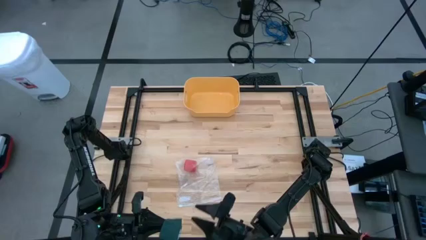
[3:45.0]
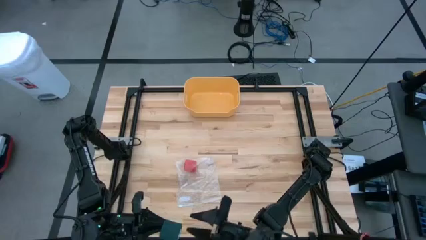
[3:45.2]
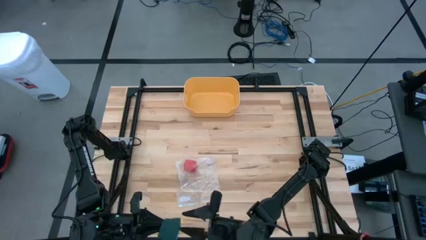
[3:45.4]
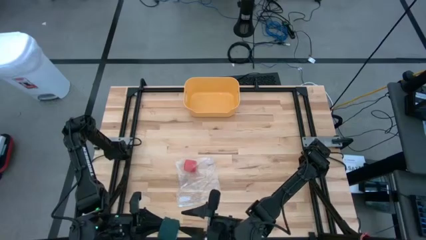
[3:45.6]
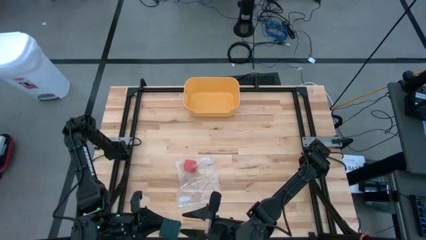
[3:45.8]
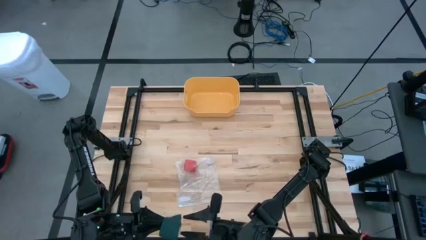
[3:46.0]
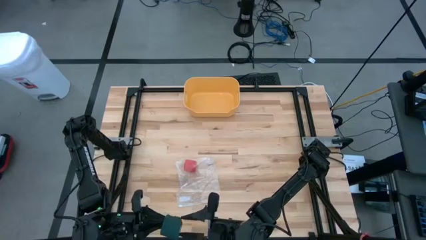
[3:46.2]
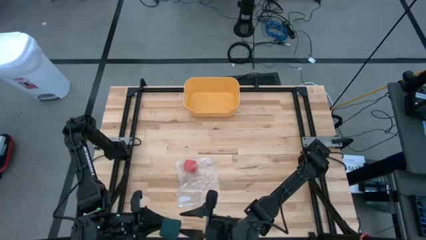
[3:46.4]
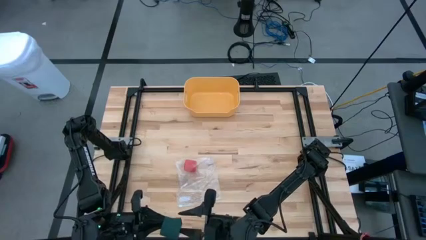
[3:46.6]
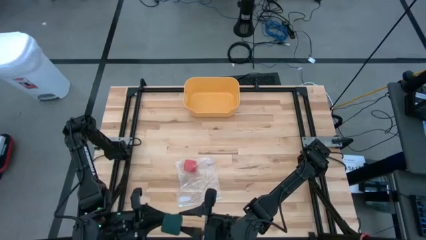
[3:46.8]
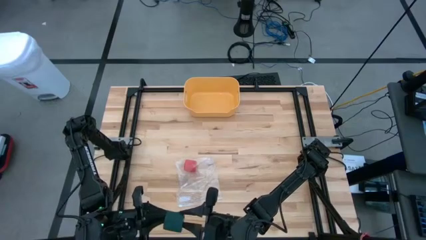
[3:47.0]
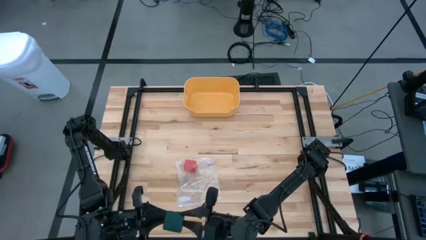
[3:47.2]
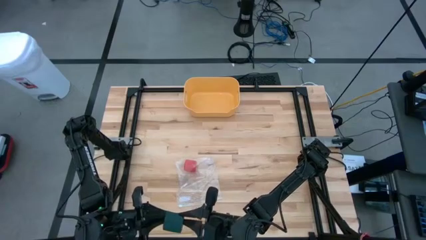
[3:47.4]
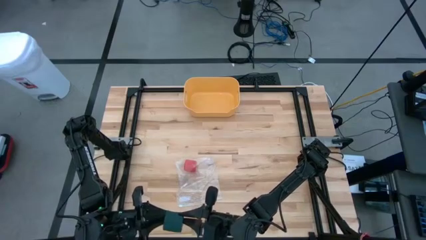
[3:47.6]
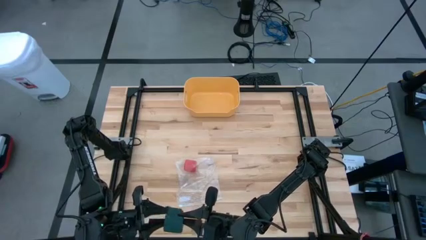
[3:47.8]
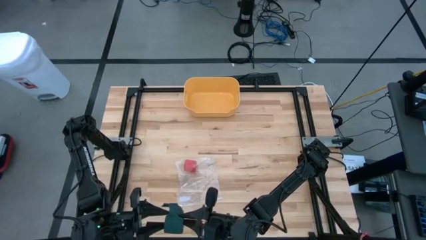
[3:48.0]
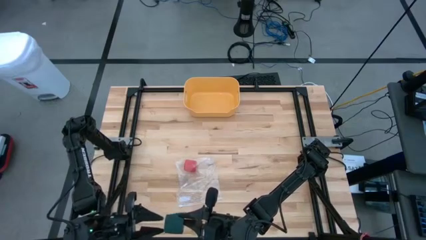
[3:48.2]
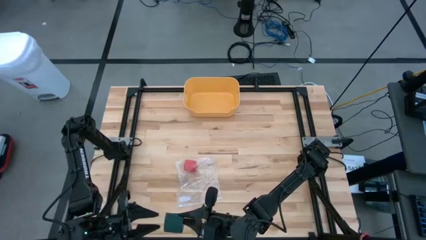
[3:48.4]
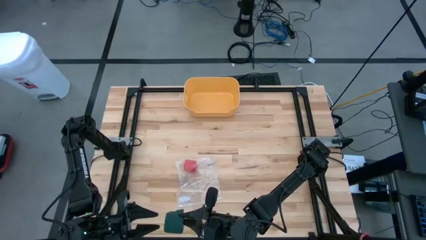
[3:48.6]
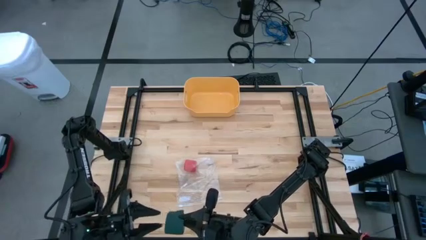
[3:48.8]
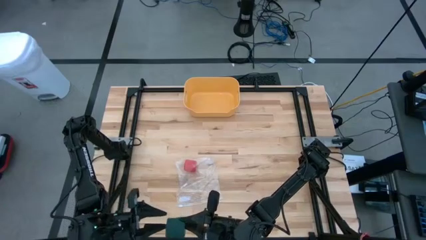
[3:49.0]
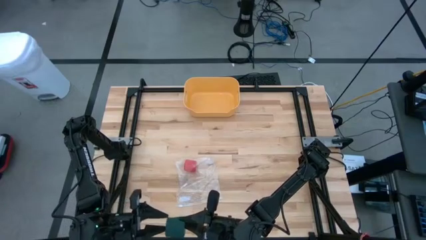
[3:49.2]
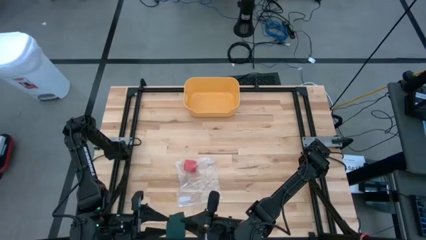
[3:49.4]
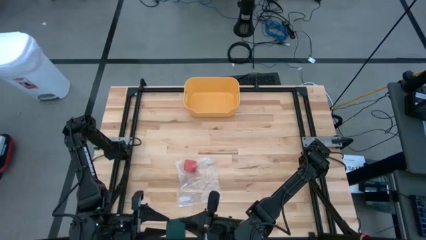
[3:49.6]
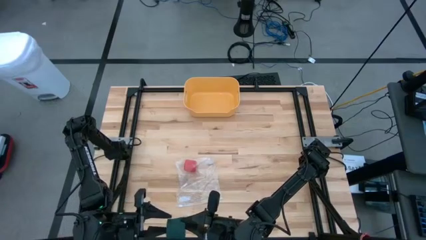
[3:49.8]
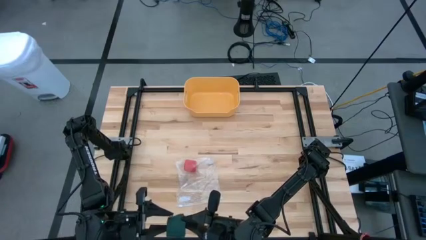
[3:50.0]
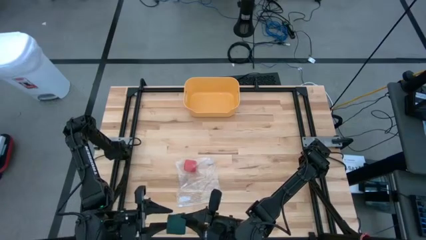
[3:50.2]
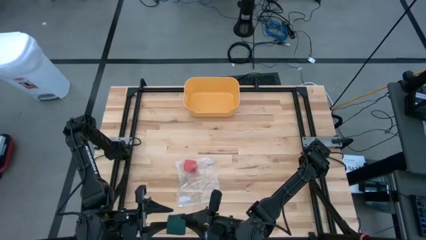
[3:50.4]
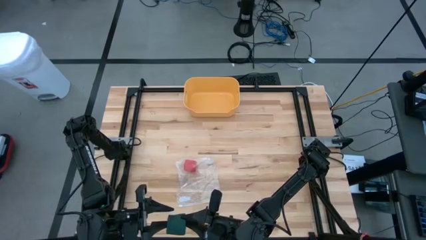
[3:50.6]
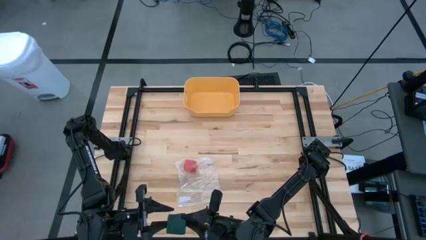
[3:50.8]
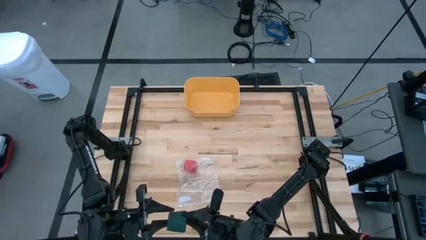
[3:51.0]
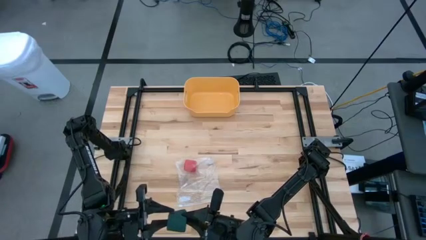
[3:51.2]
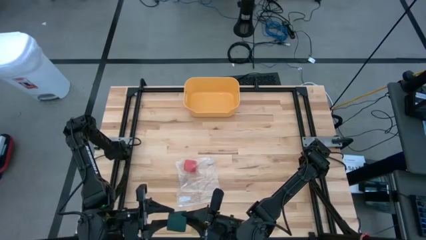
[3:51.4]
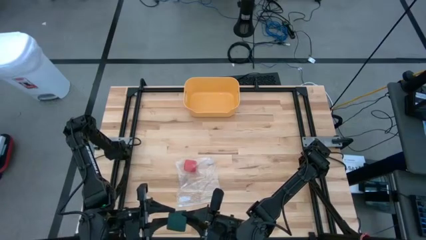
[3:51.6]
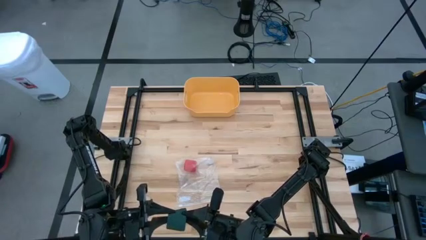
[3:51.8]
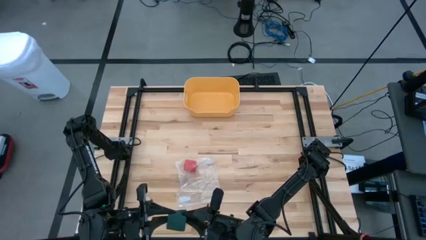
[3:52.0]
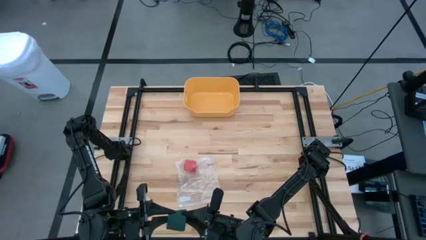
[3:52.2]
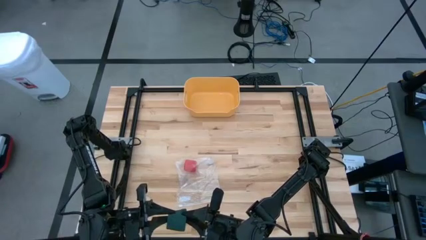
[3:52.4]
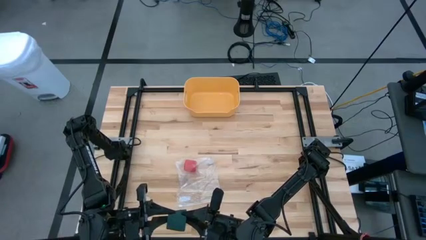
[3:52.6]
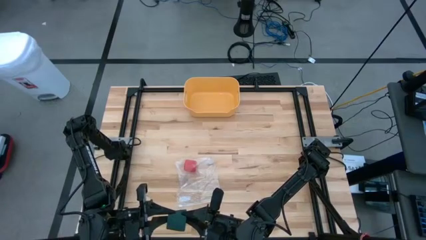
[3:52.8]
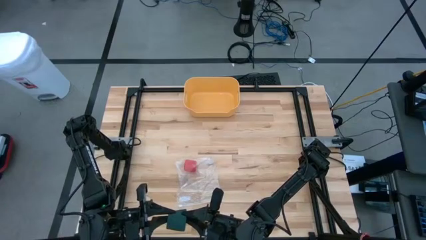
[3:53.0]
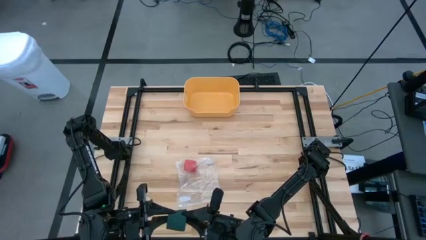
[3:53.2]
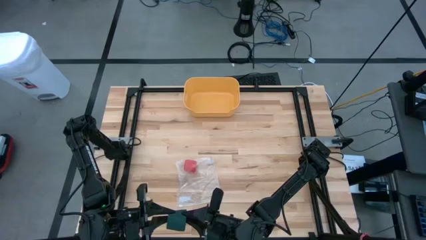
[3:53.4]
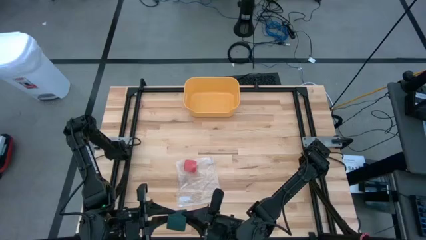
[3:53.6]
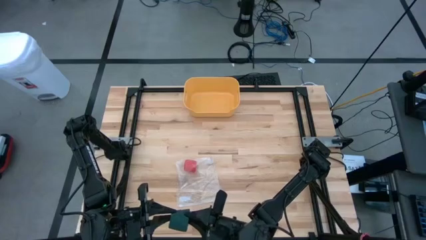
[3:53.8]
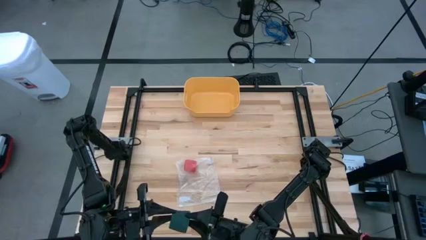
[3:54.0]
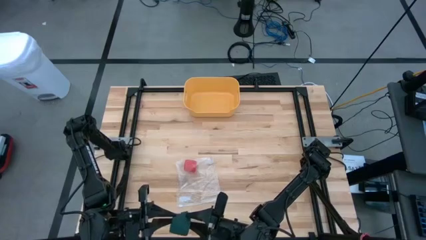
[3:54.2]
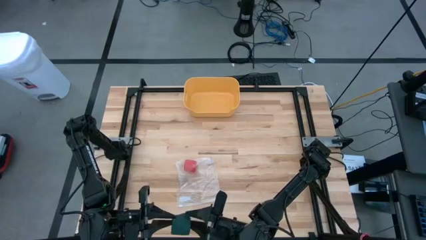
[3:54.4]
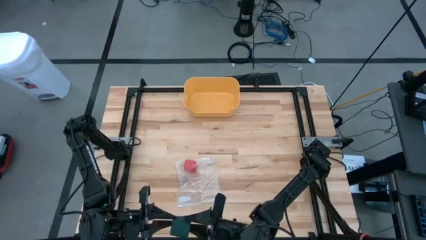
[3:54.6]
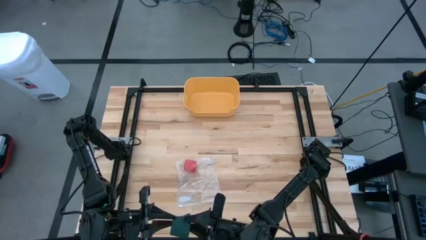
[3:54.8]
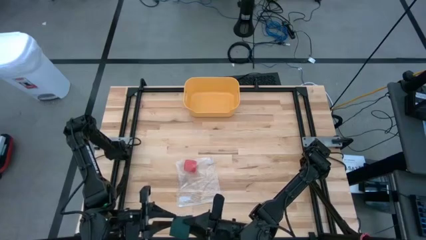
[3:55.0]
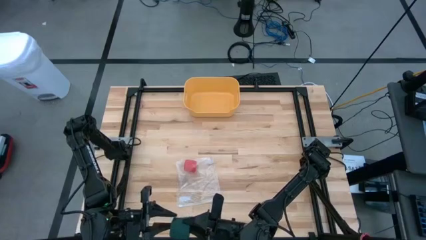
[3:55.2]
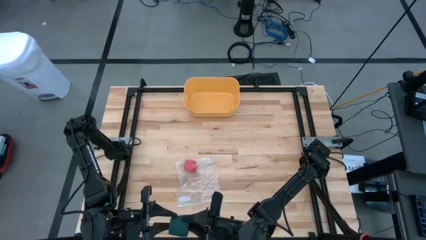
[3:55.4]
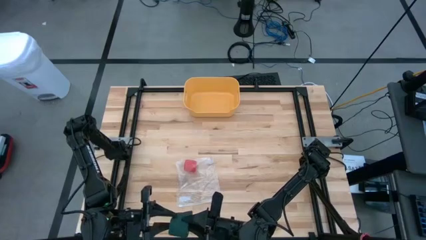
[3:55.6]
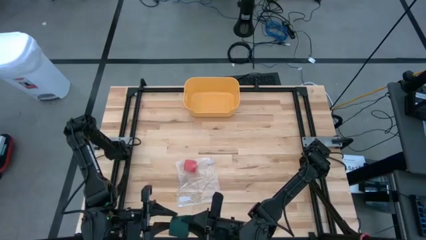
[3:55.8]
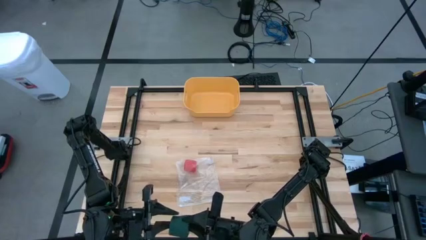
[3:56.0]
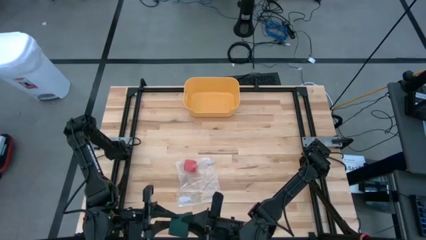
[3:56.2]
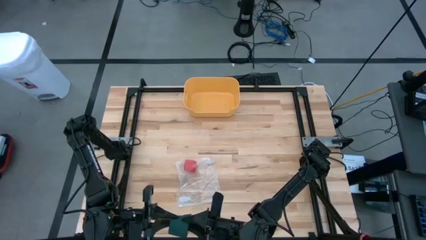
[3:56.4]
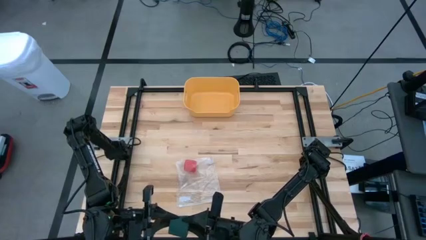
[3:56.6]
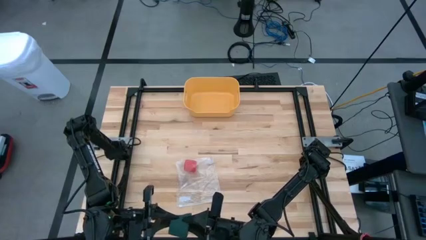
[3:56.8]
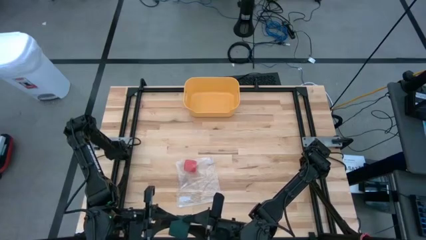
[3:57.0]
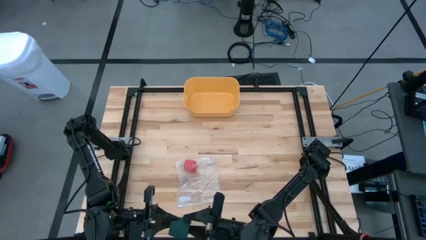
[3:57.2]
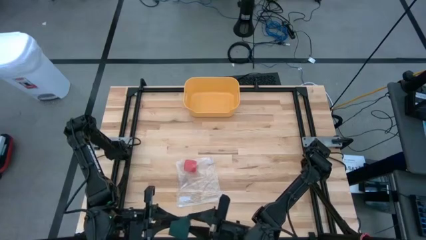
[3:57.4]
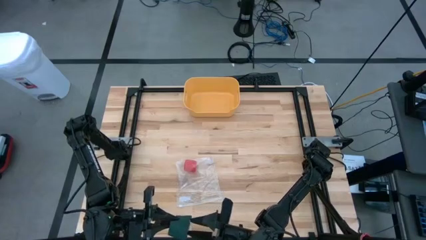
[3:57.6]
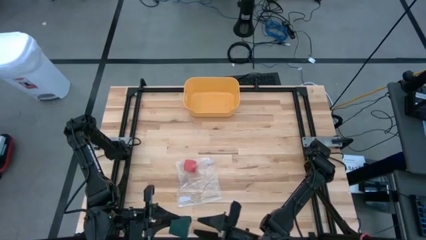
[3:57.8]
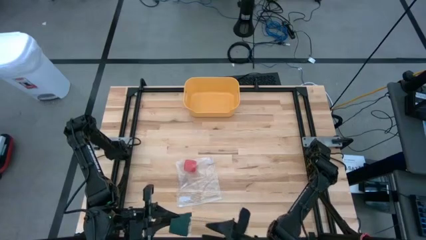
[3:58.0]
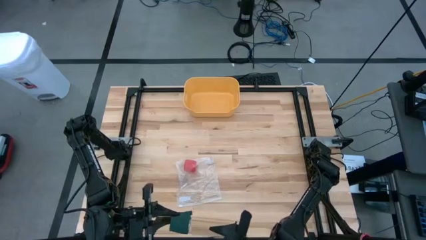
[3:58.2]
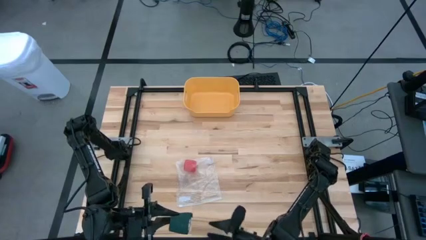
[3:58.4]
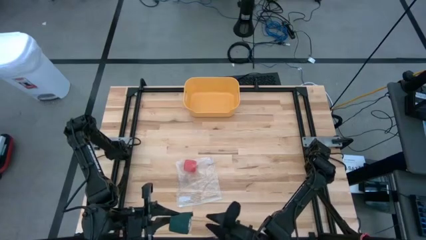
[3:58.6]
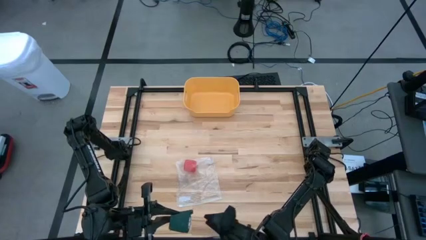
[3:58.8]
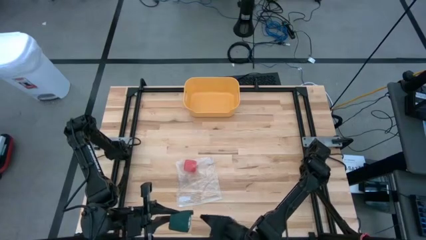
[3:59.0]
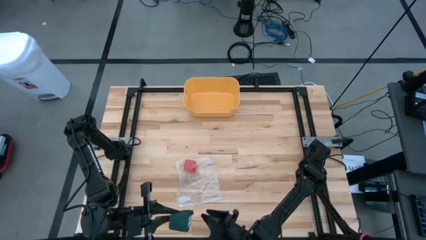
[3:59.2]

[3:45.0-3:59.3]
Task: Roll bandage
Roll the green bandage

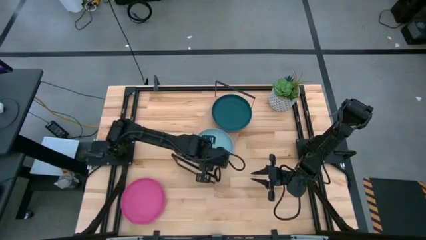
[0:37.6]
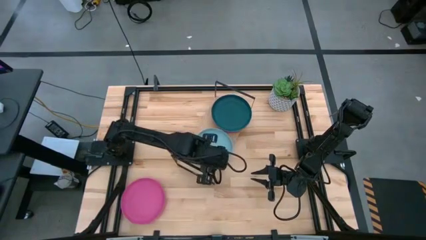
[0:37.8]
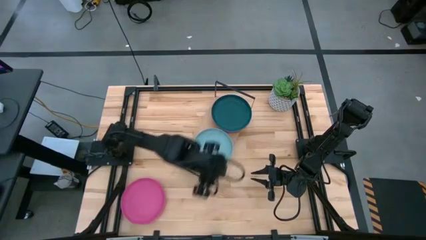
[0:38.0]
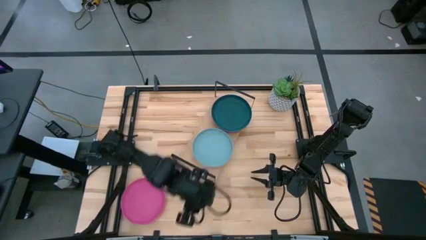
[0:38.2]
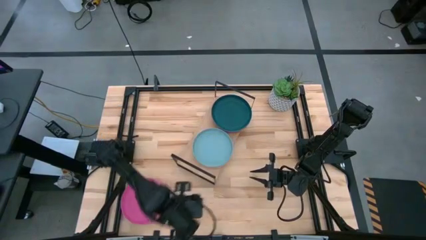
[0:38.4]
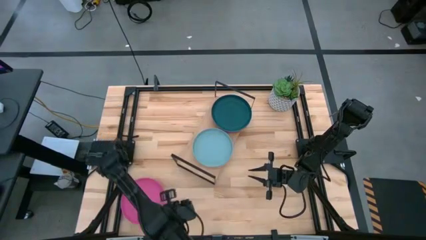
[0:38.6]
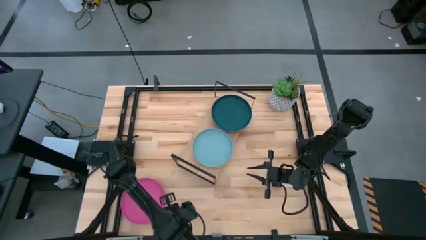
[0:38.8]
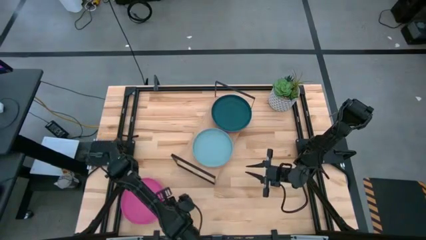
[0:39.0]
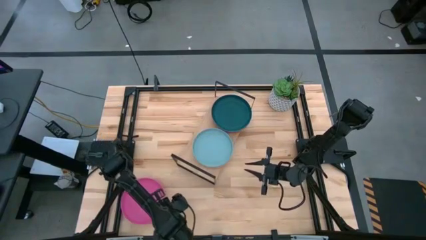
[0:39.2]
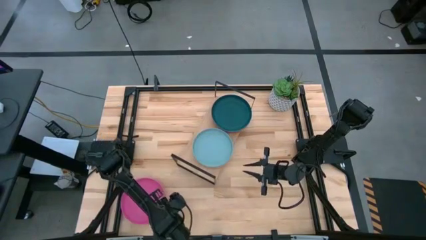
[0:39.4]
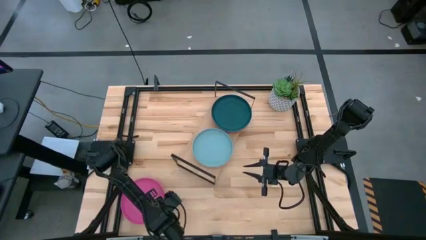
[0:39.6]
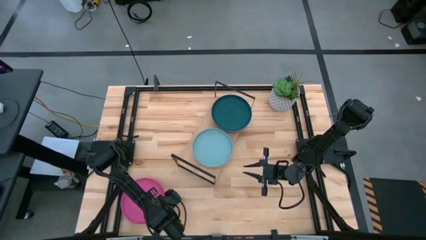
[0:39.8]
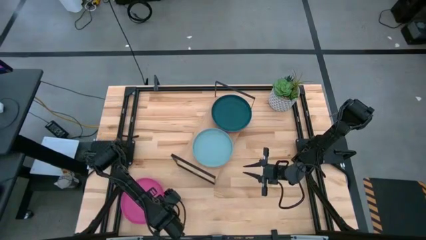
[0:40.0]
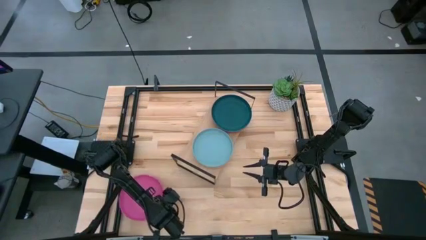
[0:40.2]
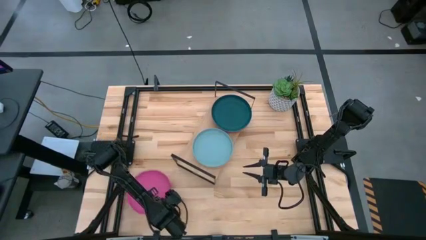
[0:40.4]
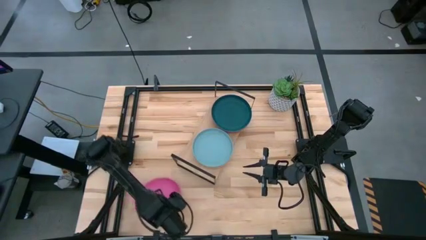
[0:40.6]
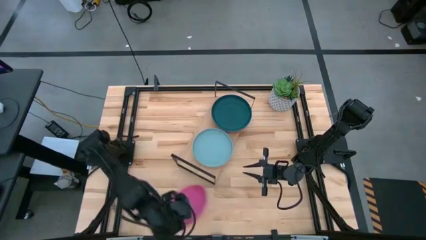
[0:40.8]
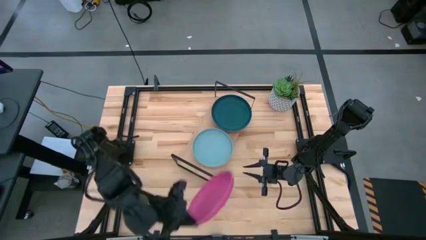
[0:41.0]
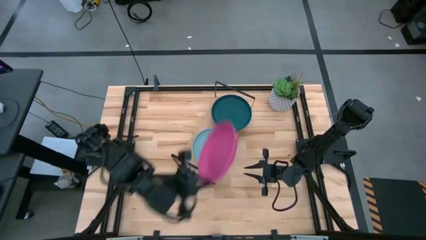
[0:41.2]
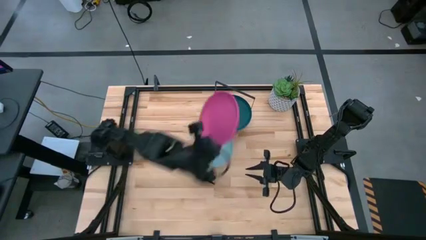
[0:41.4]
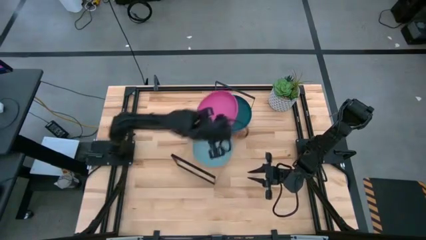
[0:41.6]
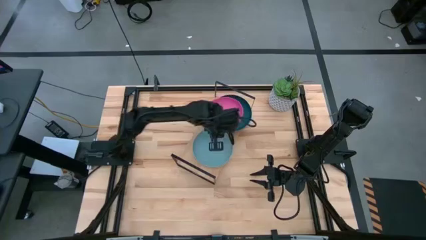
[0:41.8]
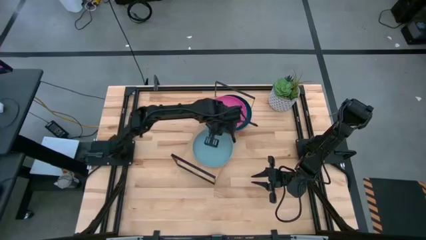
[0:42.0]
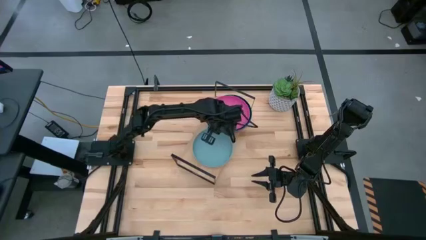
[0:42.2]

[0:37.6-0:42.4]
Task: Place and stack plates onto a shelf
Stack the pink plate on top of the dark blue plate on the shelf
